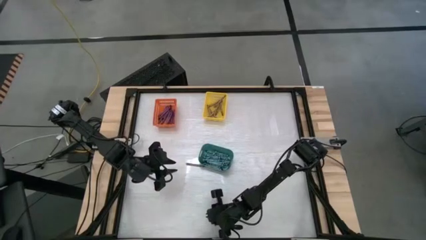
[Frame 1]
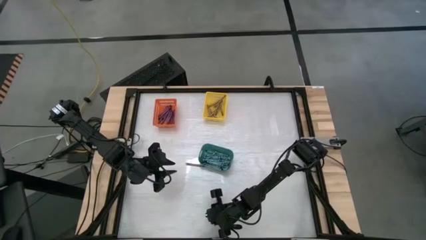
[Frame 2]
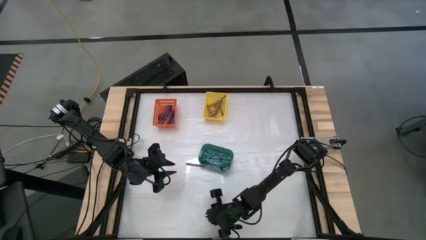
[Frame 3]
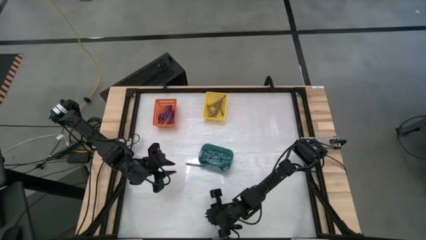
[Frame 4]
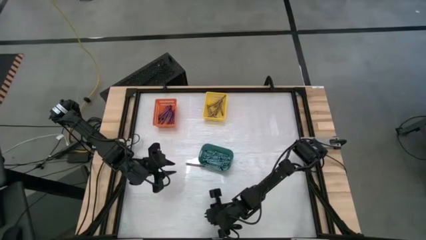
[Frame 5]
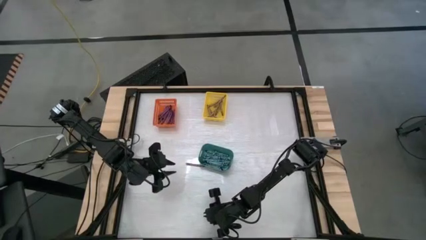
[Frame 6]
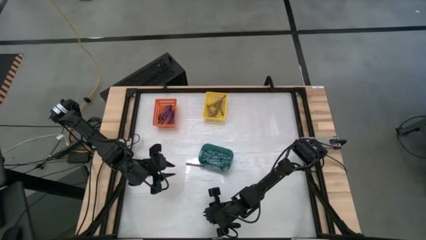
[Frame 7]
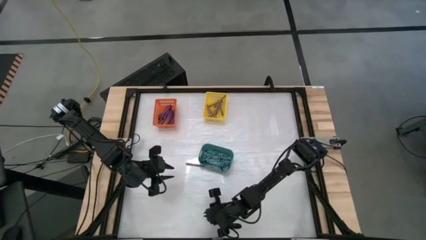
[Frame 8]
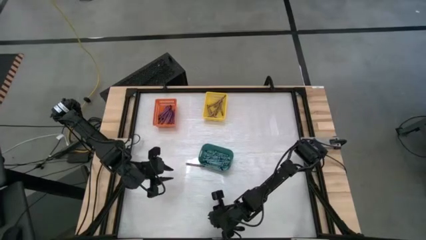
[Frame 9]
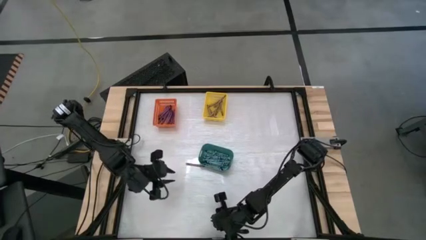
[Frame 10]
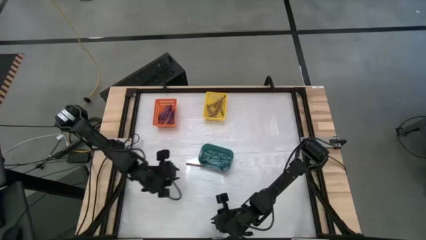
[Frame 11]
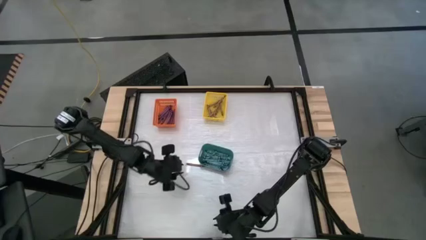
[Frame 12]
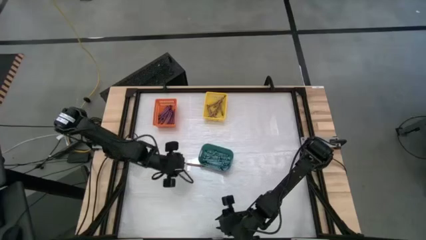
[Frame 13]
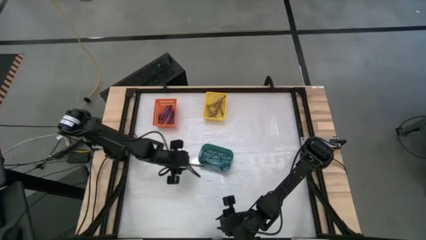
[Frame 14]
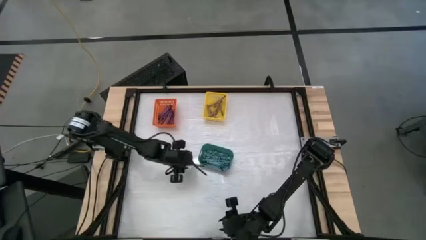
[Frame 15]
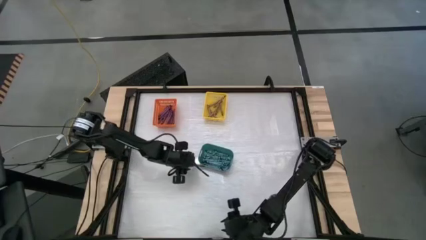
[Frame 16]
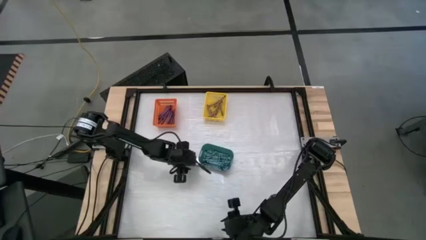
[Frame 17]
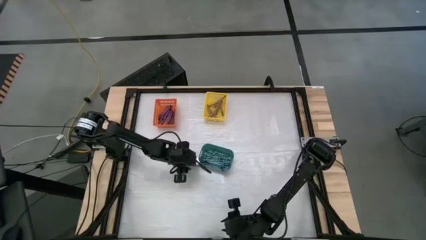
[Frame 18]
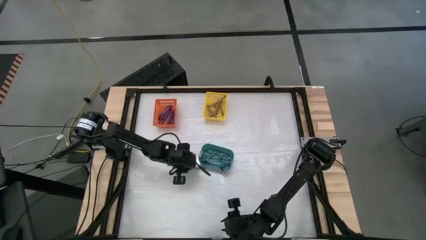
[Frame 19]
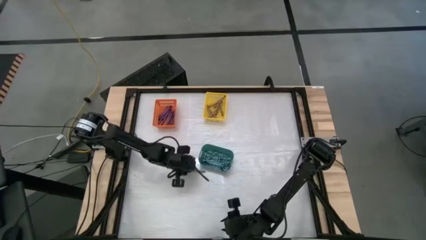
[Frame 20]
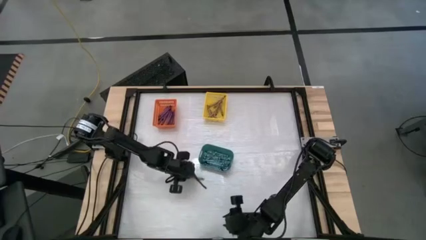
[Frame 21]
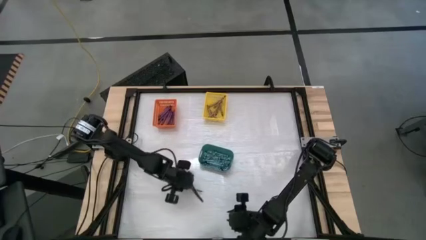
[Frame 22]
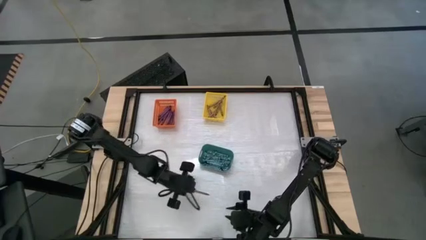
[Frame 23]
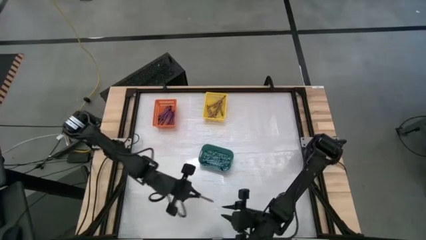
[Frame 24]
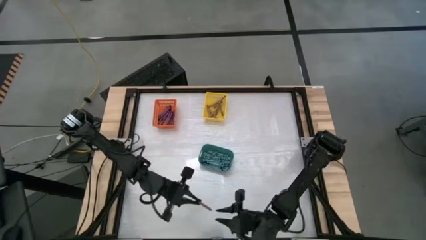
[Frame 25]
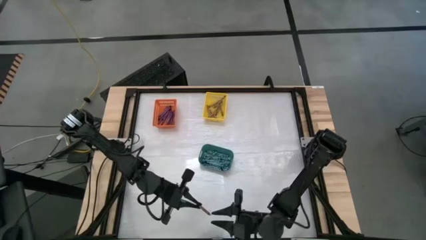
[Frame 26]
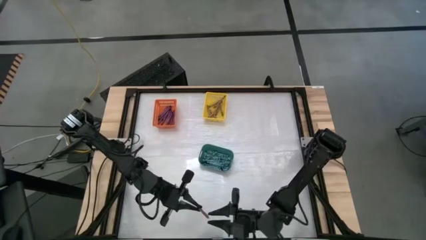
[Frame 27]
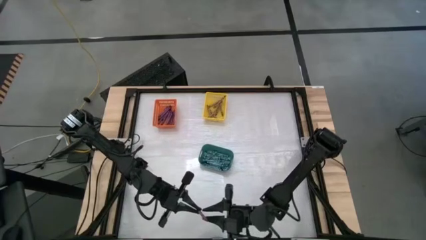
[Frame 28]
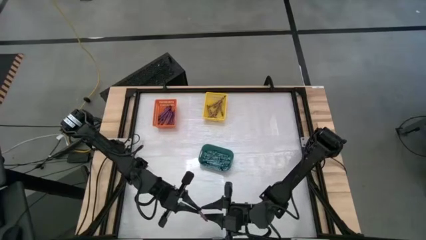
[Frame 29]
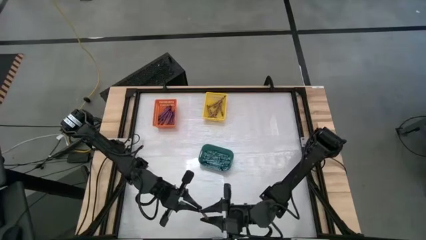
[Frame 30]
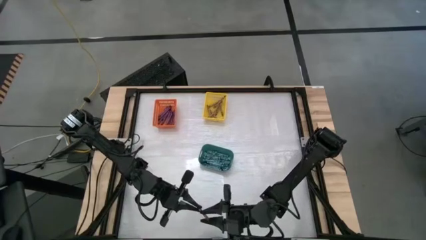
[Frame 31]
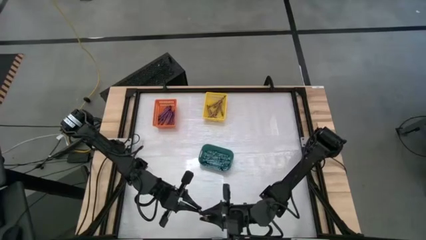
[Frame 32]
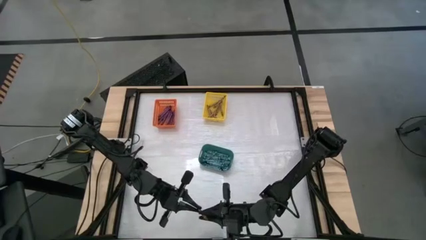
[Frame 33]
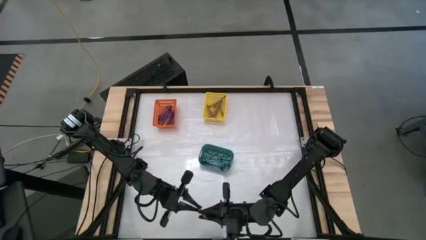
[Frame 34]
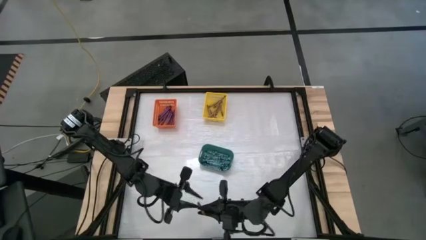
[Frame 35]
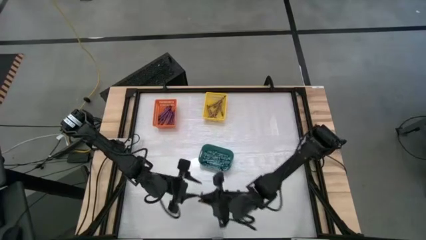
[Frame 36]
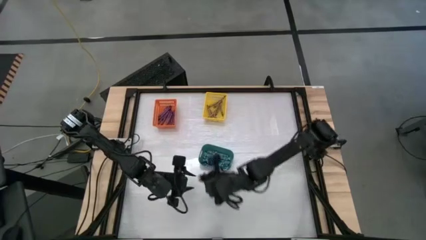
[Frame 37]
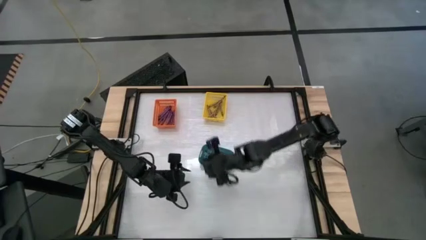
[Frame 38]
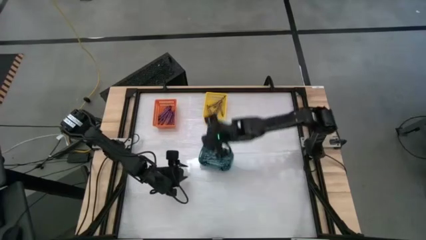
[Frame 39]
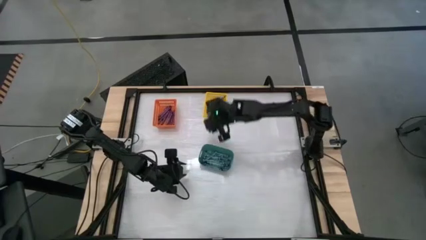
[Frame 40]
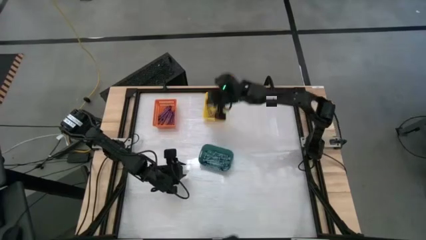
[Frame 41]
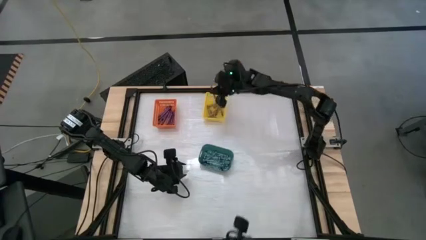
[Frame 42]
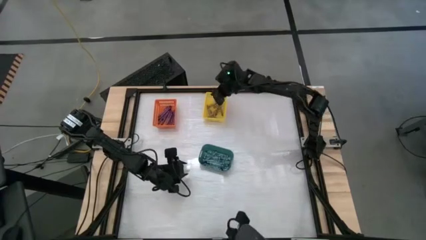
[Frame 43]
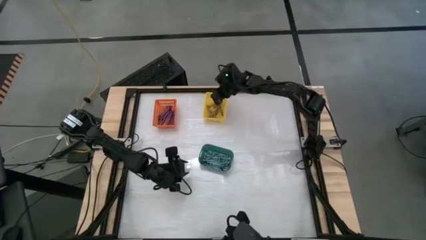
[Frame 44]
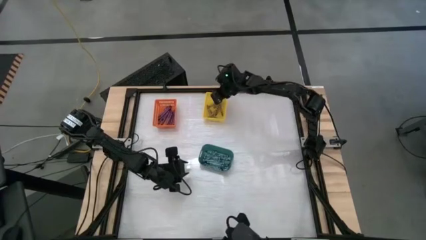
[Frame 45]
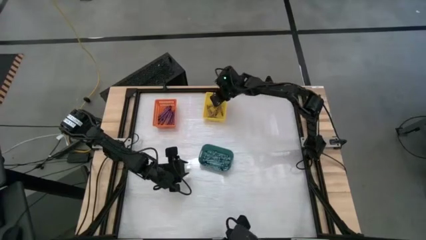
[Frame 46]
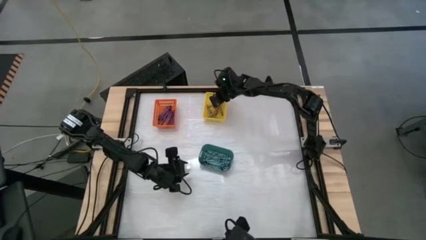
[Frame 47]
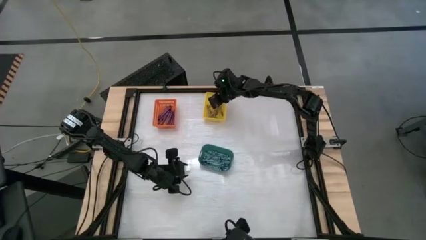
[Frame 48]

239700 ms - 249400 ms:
Task: Sort crayons
Put the brown crayon into the yellow bin

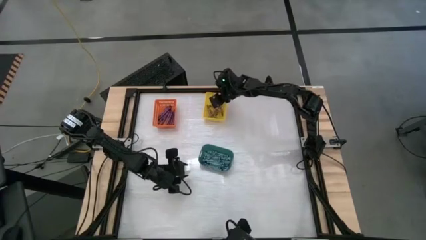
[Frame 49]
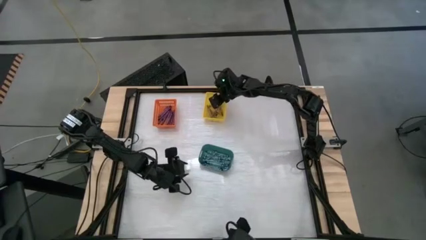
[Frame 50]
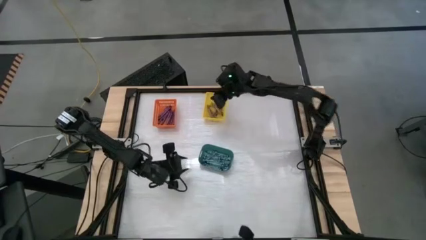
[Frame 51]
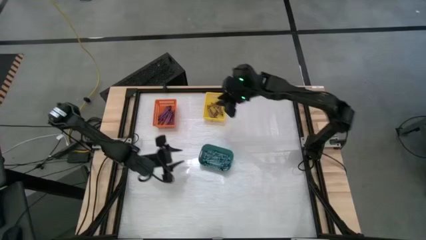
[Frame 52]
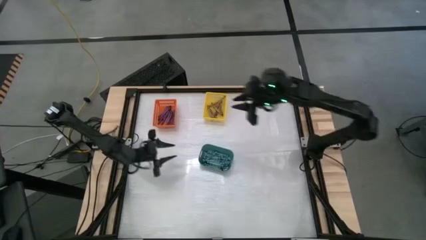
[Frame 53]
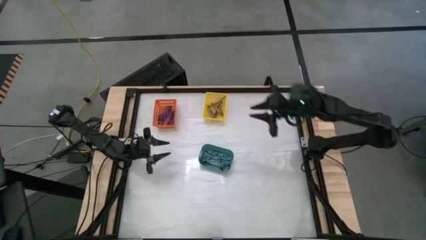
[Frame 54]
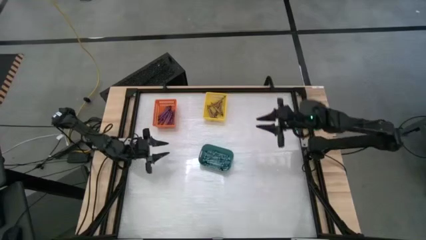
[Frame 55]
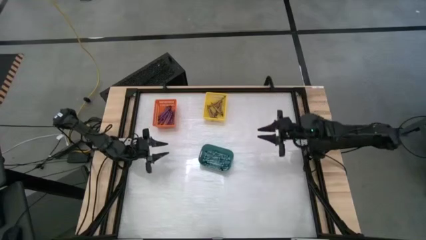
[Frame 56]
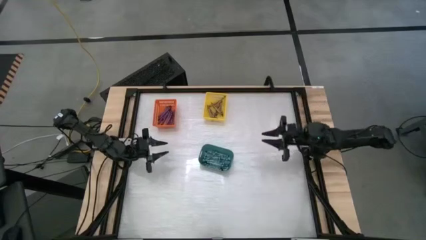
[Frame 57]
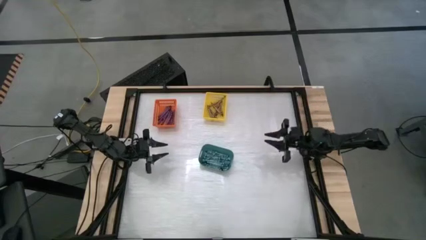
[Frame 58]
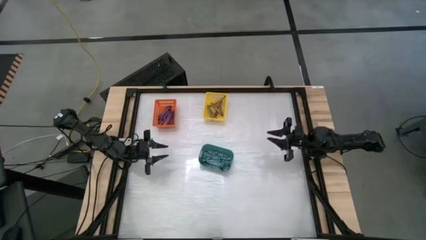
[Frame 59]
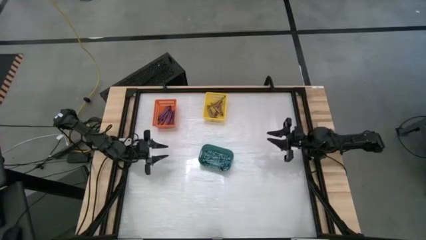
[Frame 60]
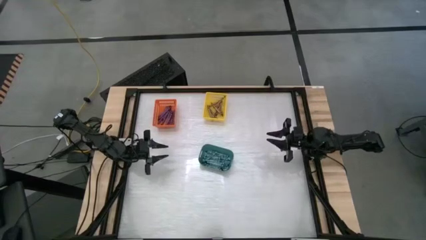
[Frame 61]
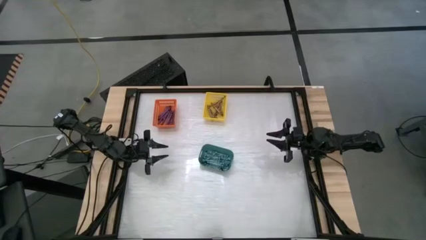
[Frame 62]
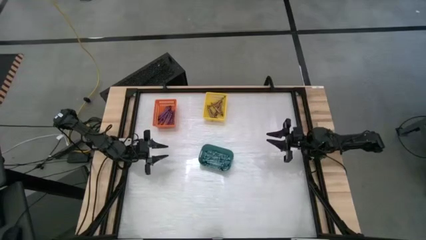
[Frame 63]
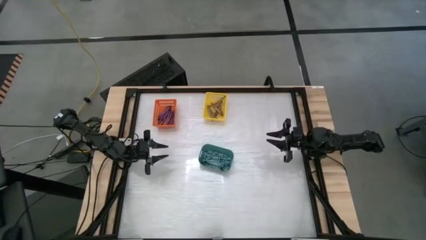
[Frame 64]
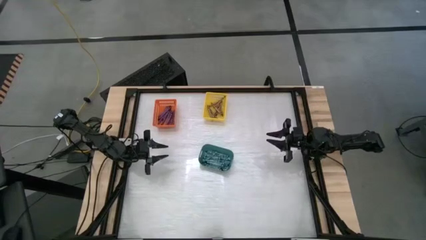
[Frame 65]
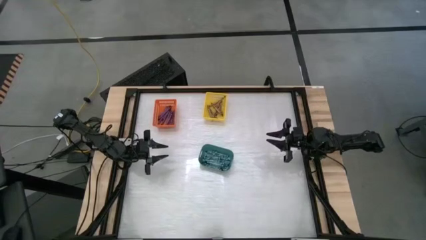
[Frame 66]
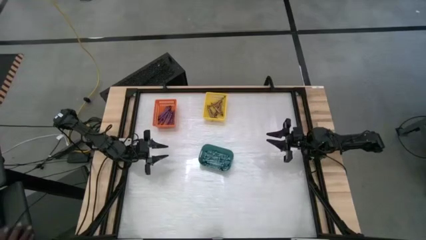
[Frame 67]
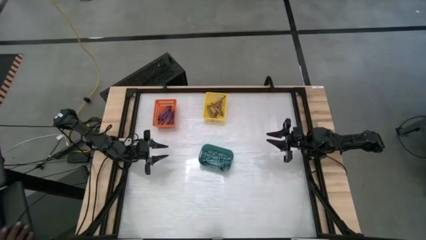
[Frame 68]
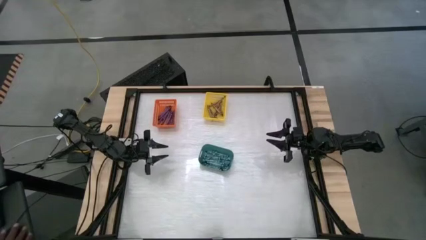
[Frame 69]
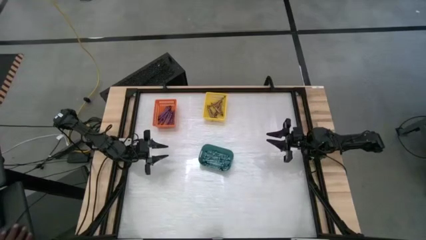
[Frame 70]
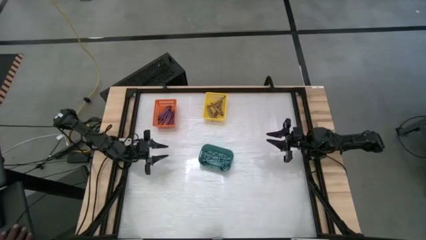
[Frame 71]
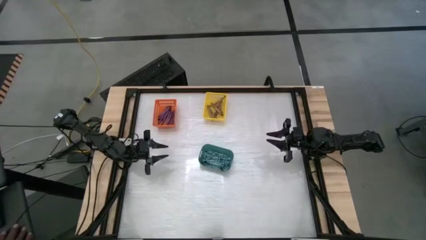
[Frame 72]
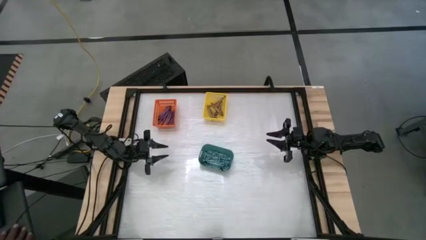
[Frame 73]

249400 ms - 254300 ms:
Return to Home Position

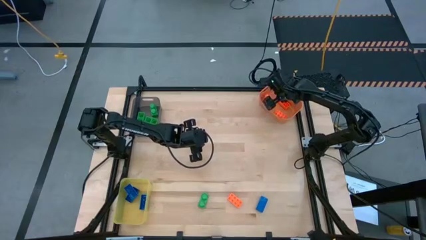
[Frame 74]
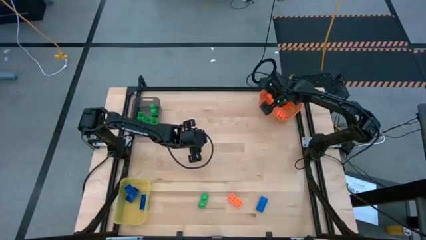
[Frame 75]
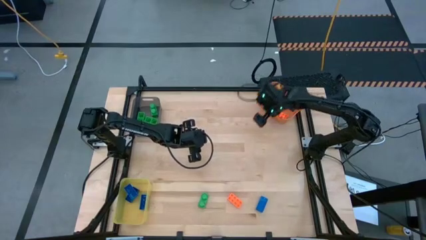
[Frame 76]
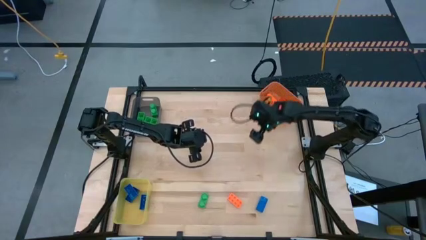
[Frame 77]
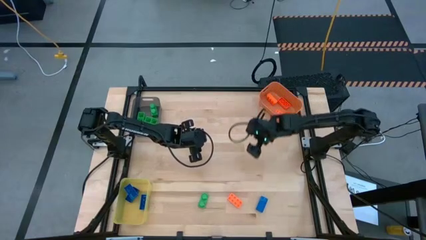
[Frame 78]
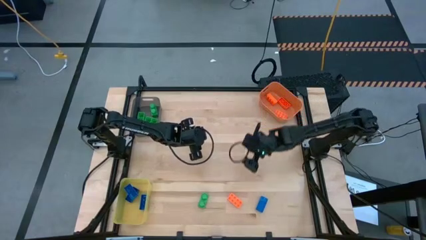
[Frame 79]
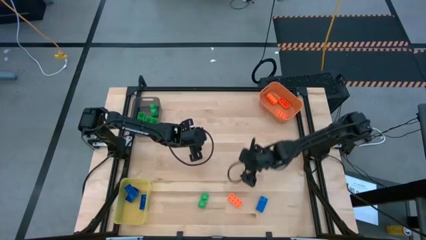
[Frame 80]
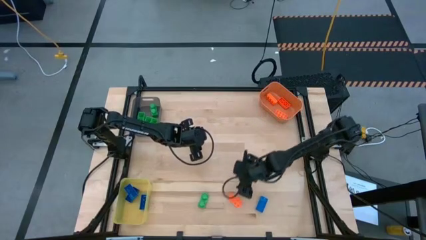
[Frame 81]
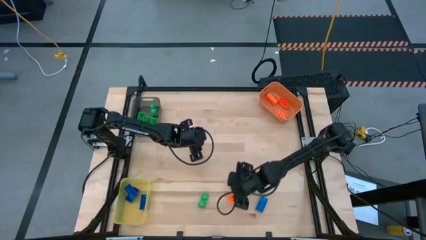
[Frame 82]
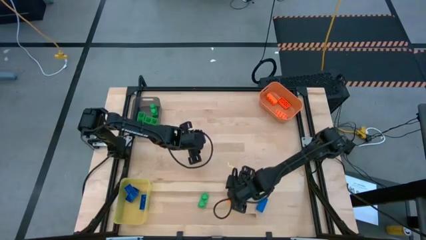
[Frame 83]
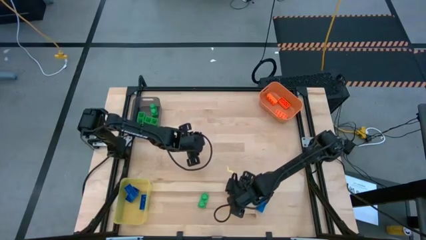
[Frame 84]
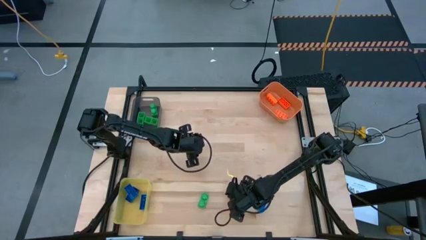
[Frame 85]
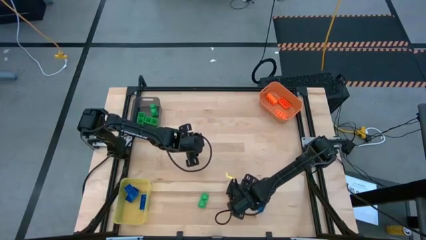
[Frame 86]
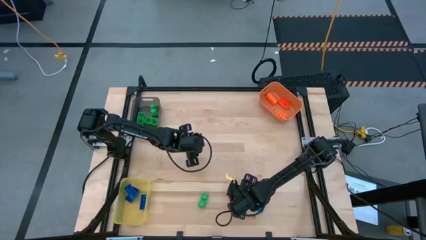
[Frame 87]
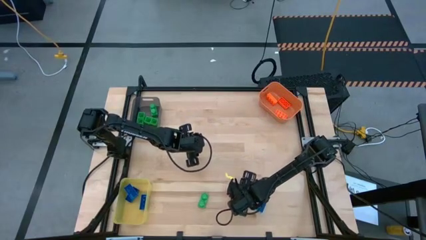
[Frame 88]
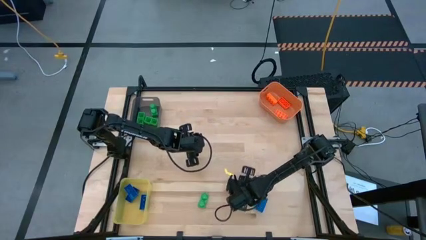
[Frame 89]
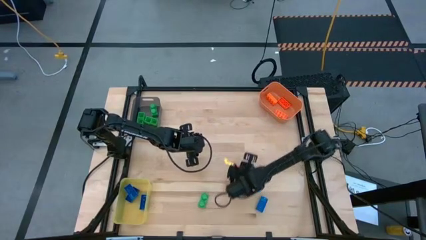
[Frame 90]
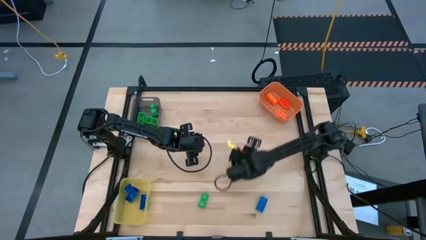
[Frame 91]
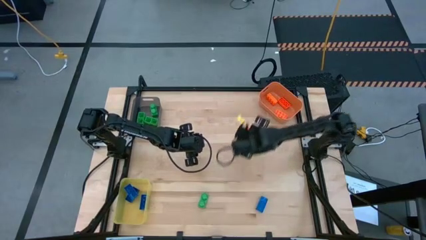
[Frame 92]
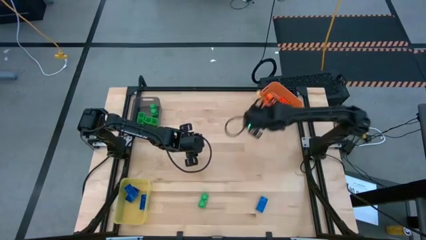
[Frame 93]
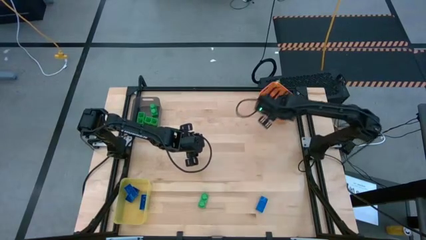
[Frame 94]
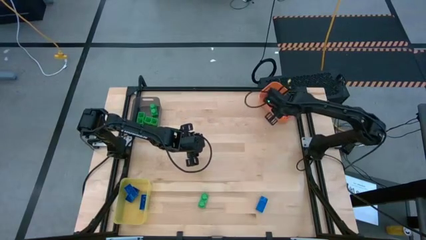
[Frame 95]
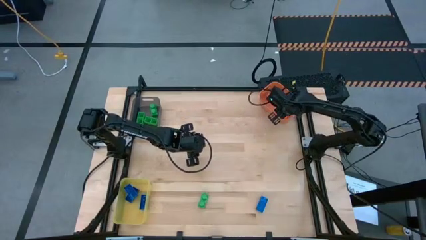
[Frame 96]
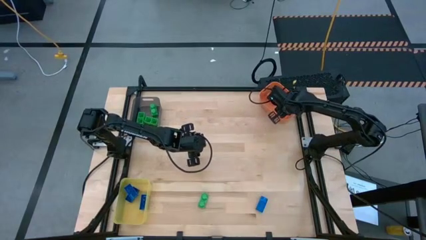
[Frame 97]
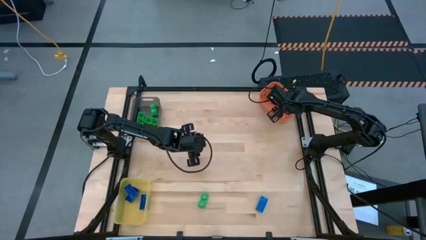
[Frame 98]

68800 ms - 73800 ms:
Task: Sort & place blocks by color
Put the orange game piece into the orange bin
